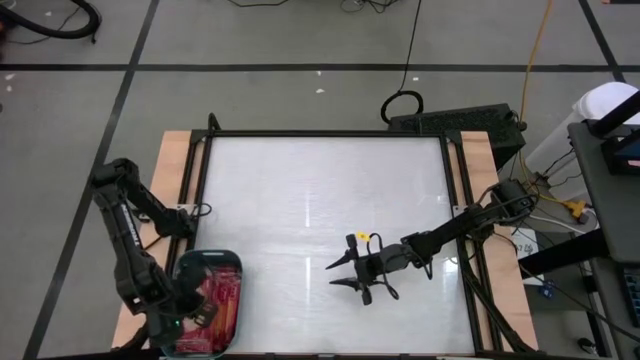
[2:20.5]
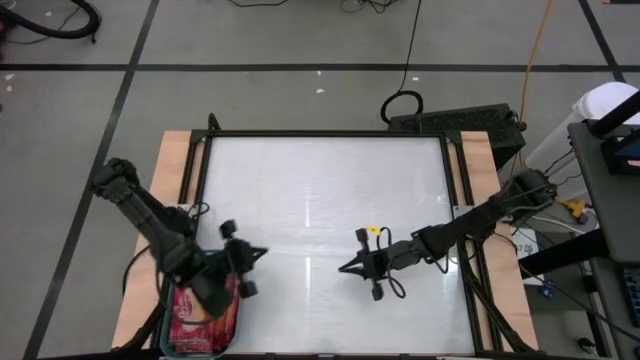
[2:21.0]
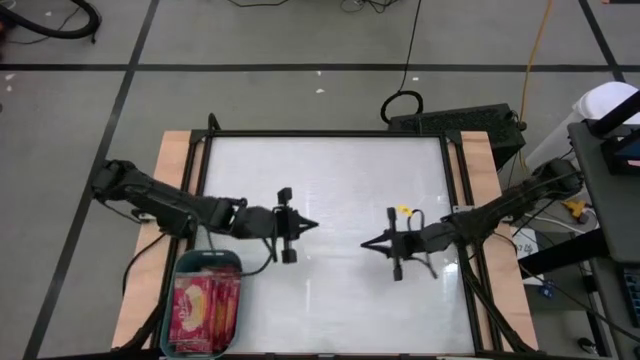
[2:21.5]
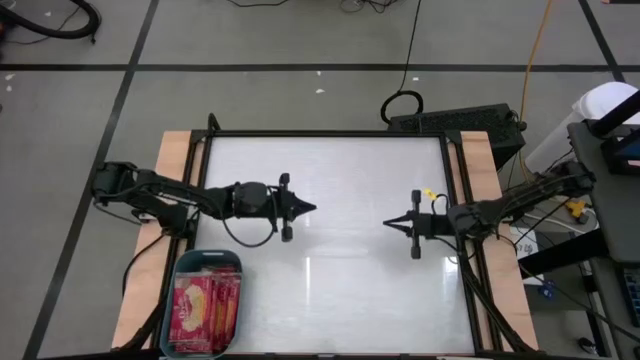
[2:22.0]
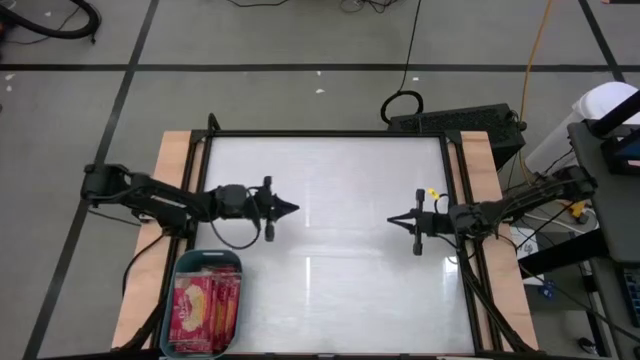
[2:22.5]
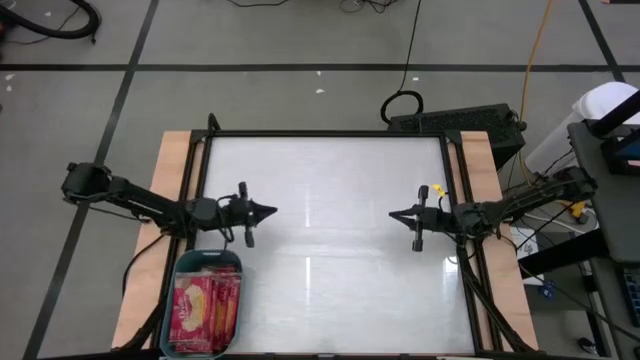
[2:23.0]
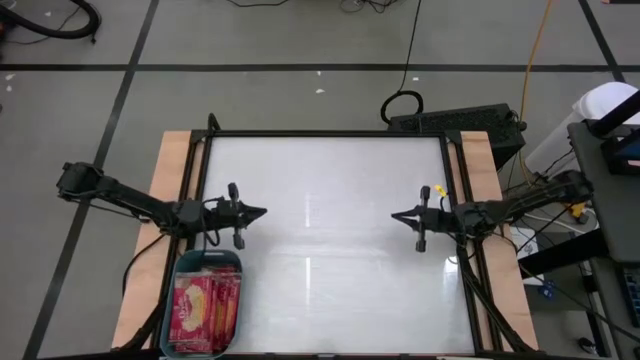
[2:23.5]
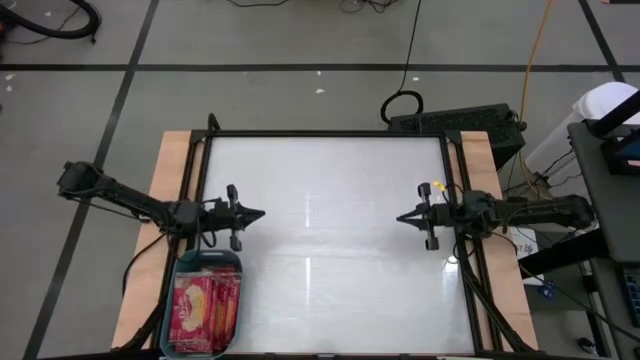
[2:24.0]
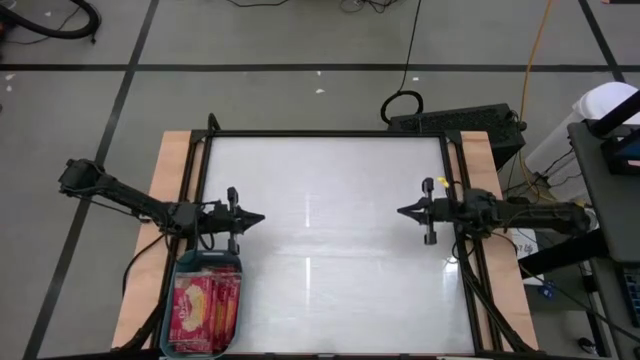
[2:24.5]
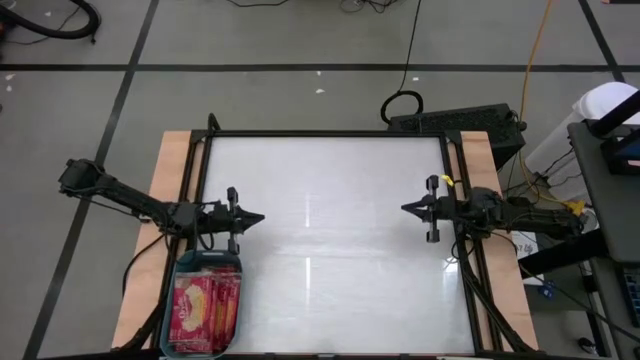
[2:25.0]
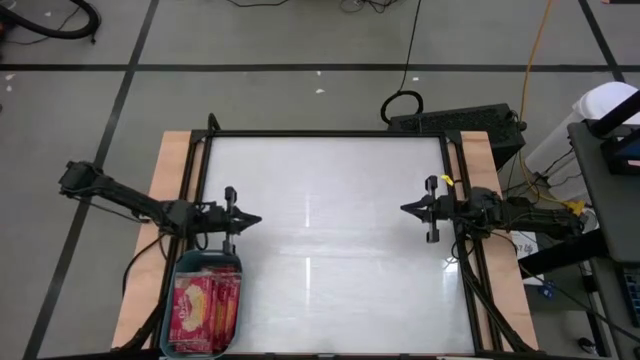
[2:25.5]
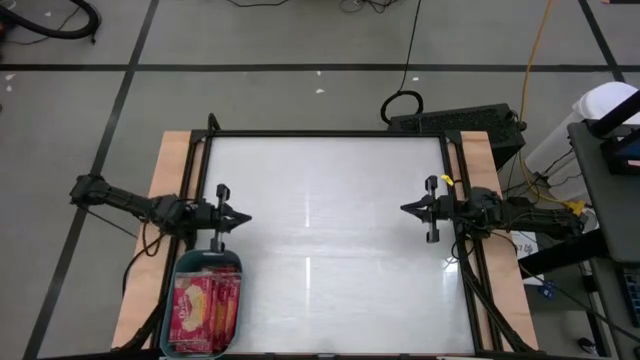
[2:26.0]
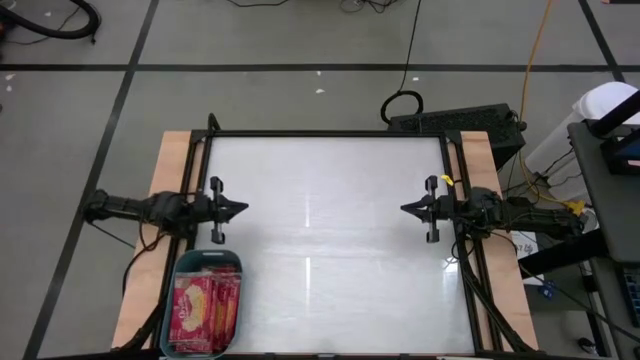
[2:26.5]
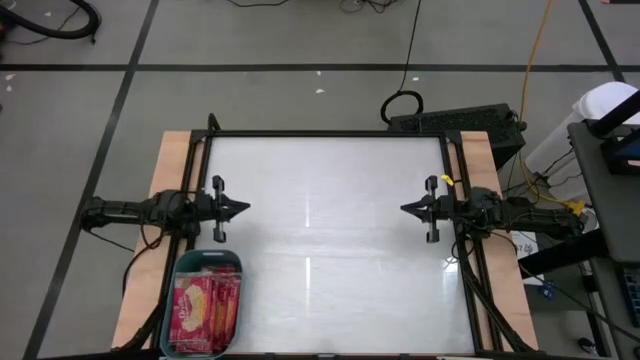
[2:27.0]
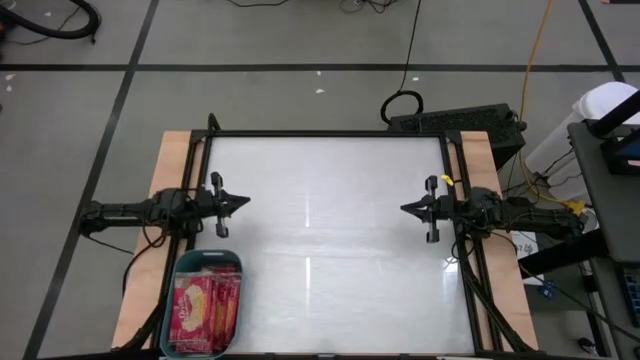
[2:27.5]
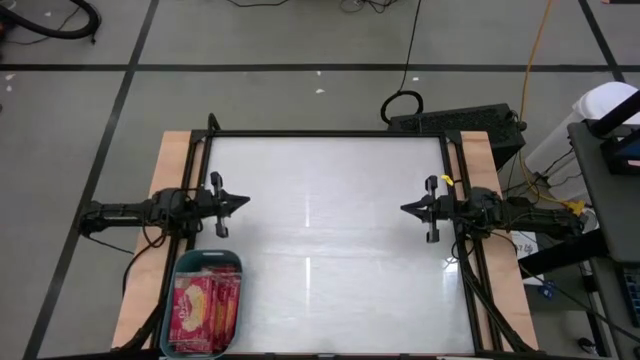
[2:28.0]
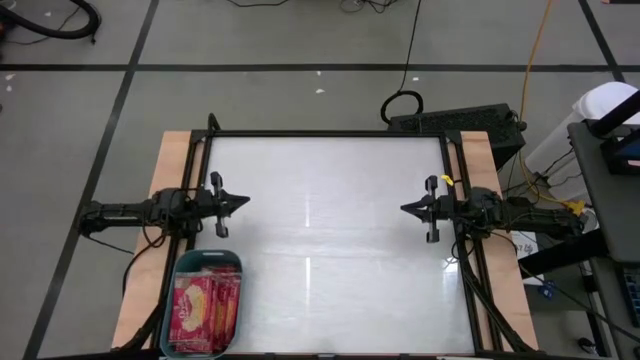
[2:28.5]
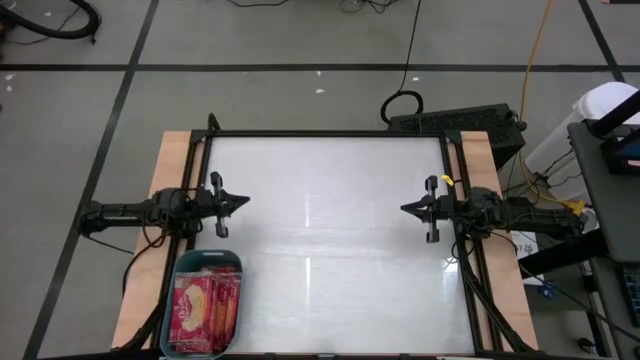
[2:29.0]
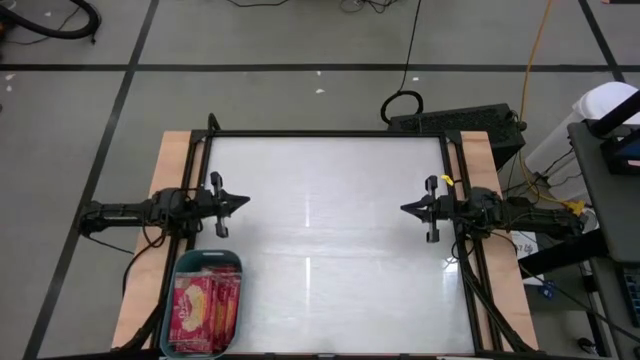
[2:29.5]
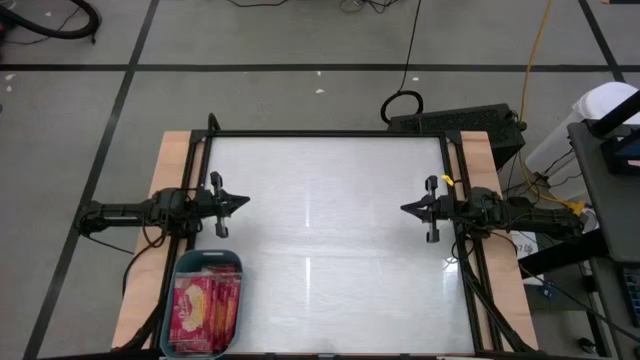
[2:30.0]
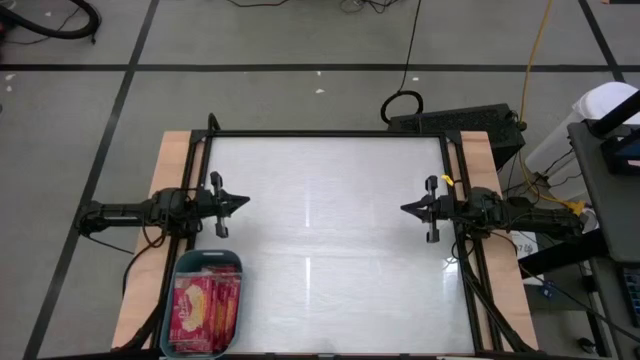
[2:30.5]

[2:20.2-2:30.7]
Task: Sort popcorn bags into baskets
Return to Home Position

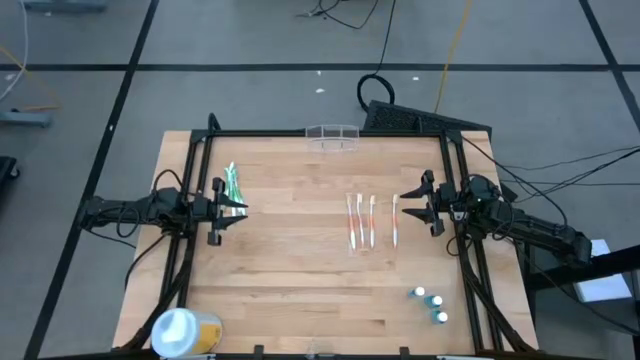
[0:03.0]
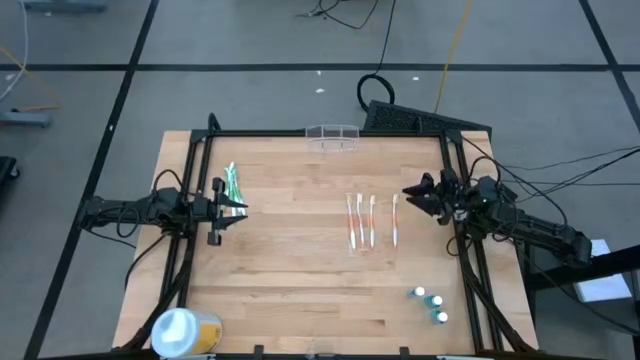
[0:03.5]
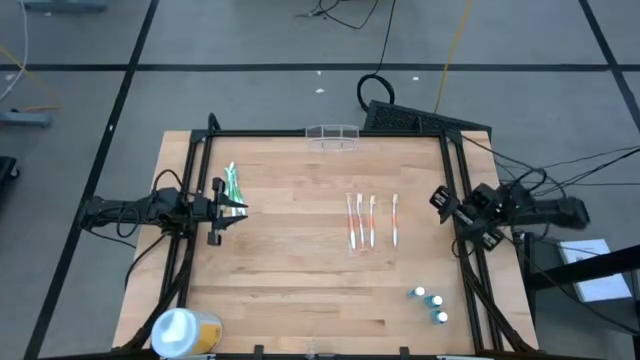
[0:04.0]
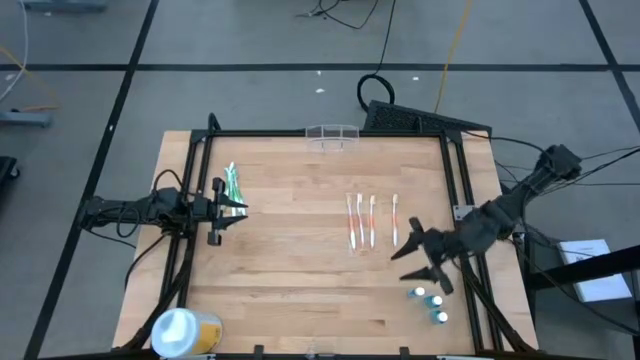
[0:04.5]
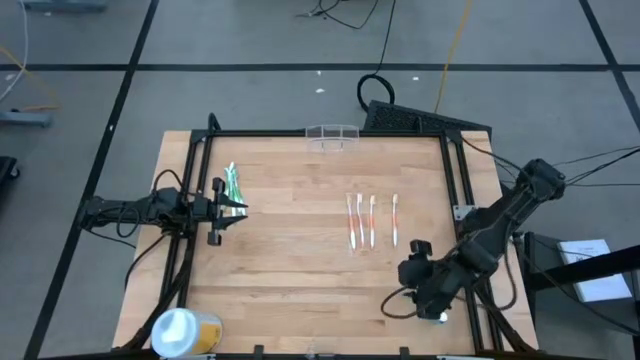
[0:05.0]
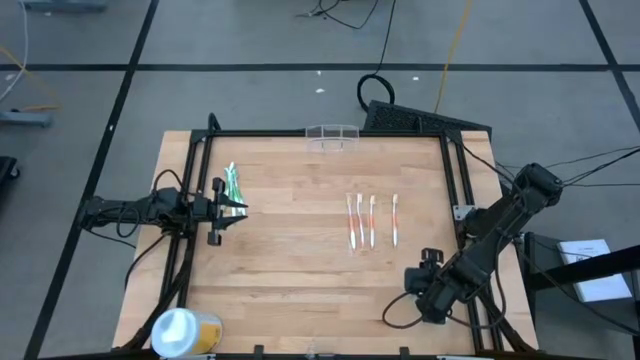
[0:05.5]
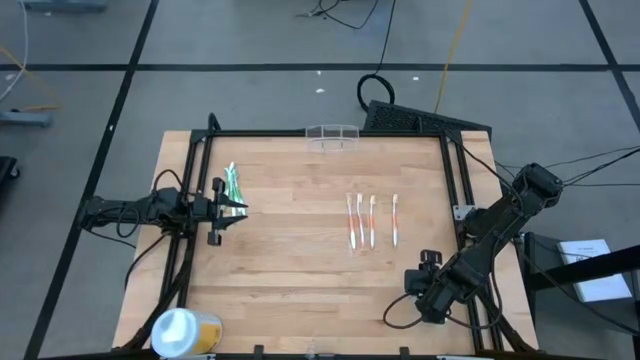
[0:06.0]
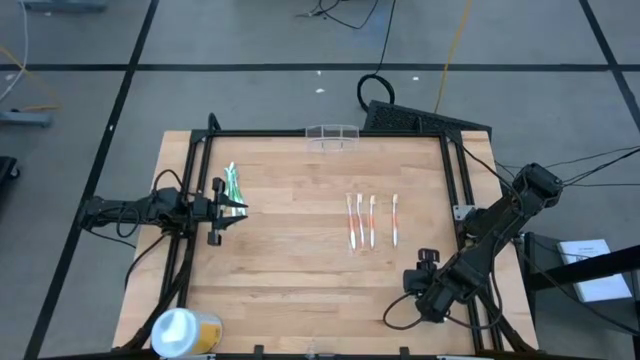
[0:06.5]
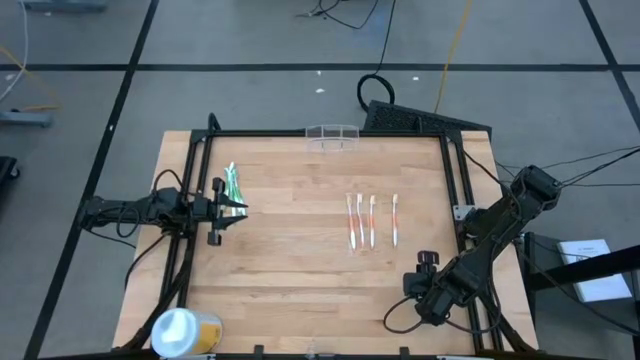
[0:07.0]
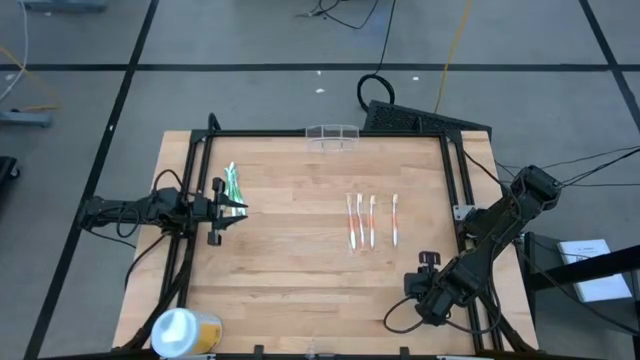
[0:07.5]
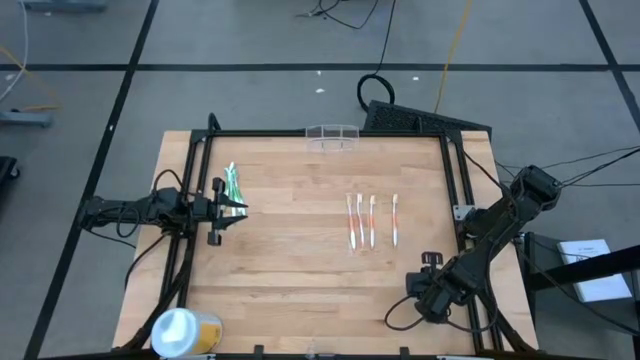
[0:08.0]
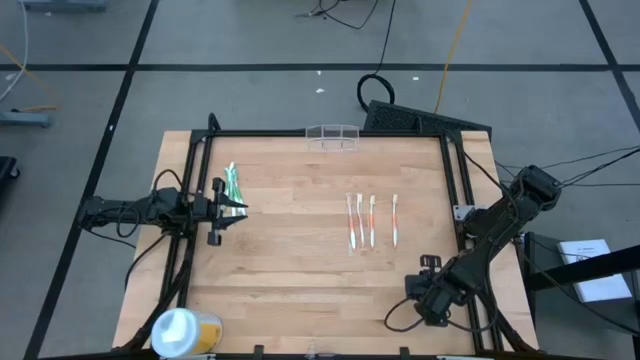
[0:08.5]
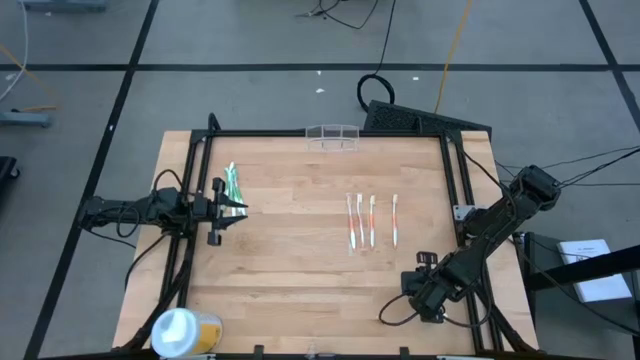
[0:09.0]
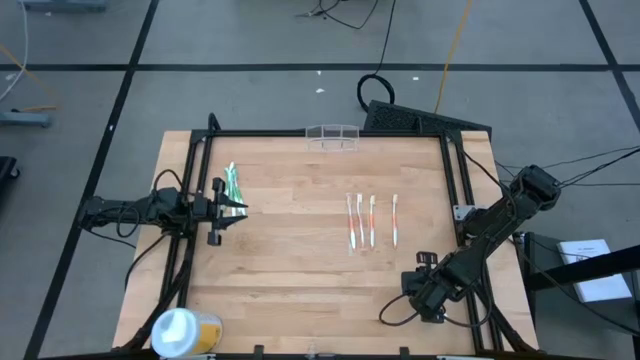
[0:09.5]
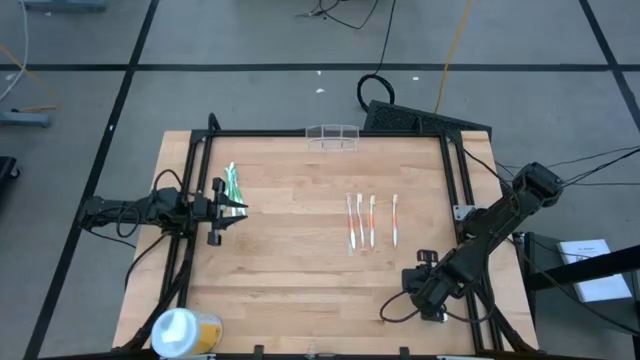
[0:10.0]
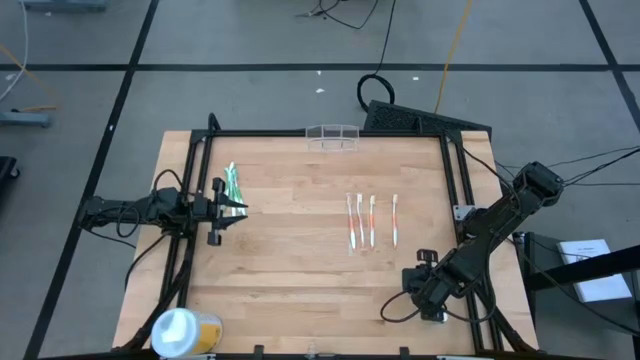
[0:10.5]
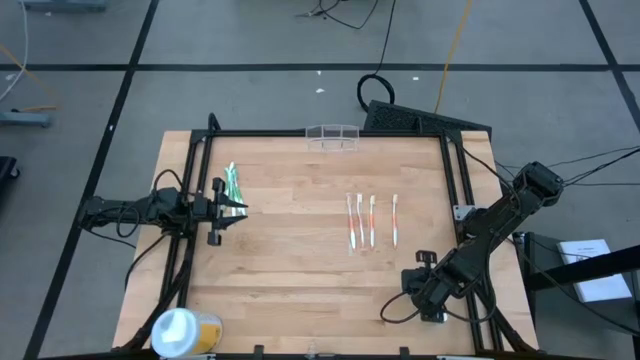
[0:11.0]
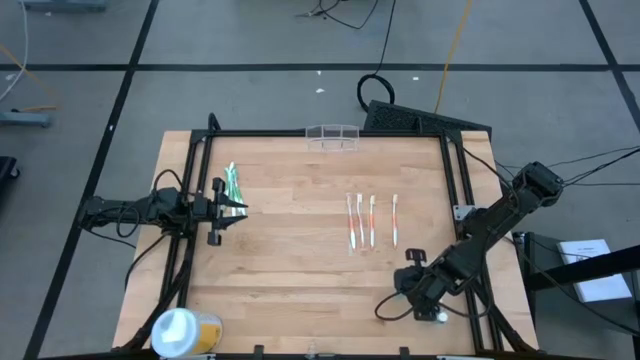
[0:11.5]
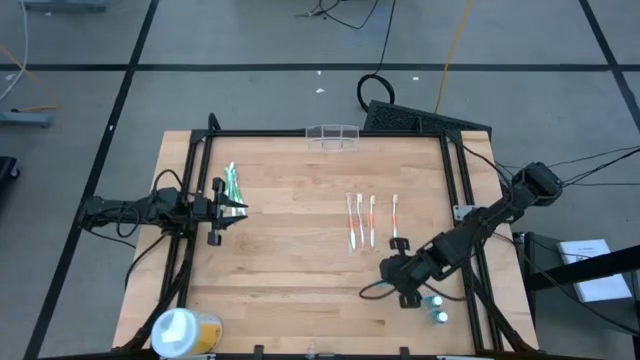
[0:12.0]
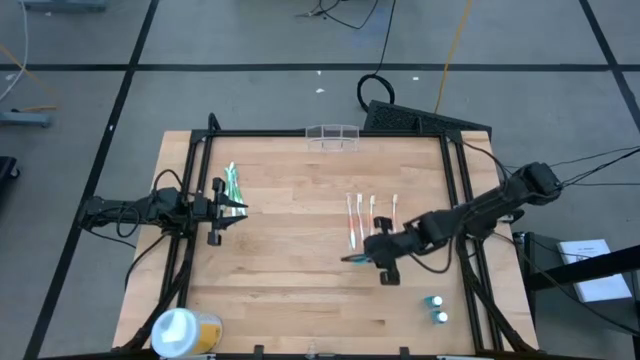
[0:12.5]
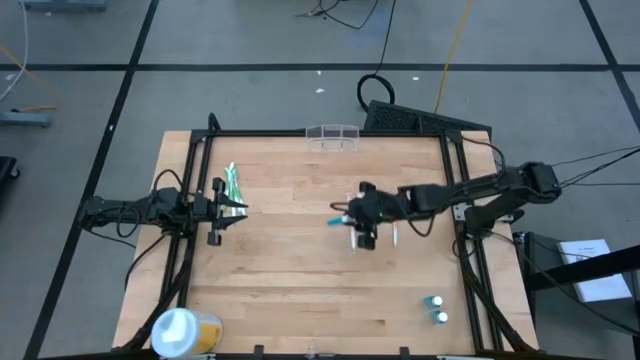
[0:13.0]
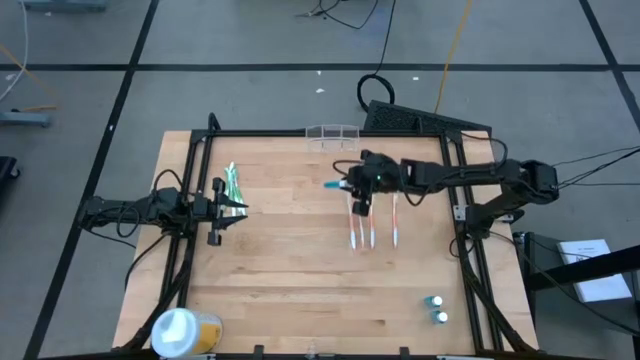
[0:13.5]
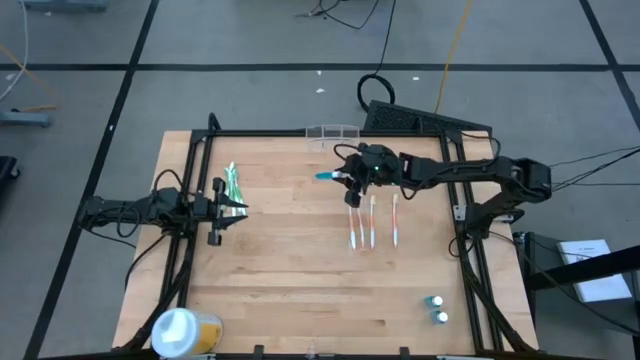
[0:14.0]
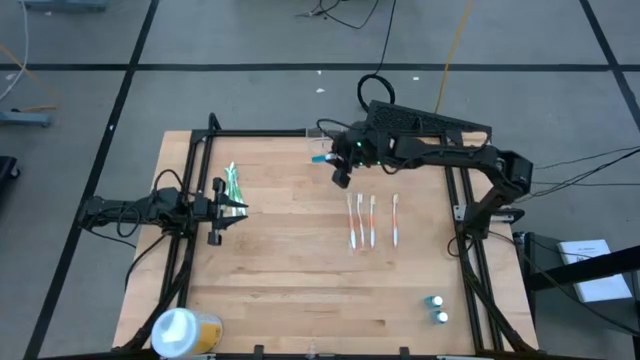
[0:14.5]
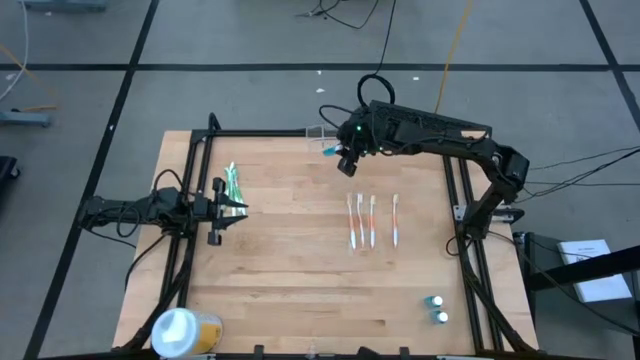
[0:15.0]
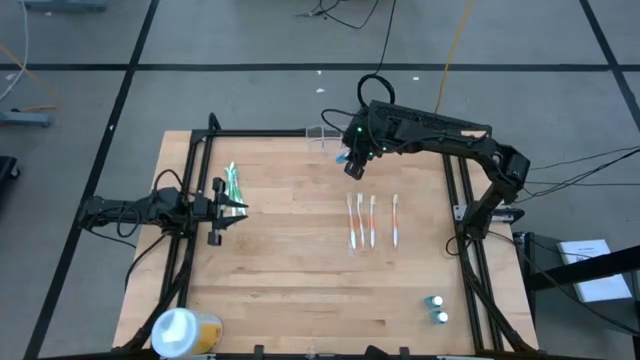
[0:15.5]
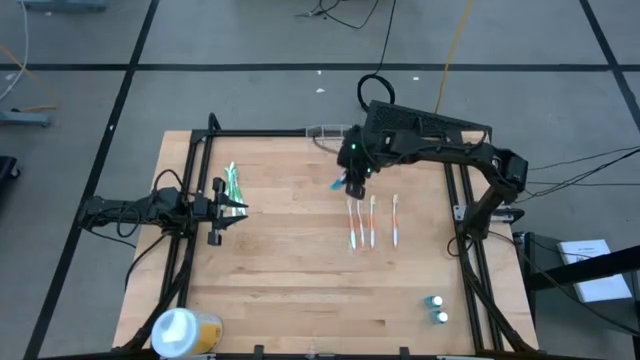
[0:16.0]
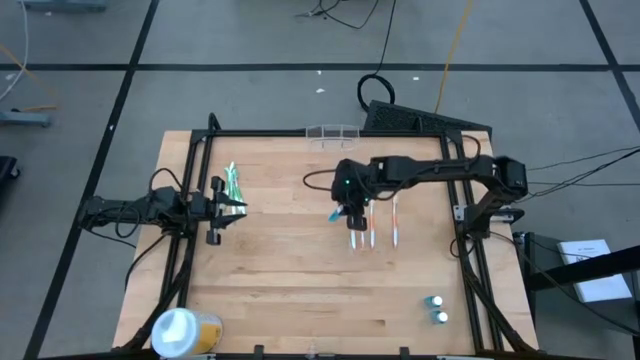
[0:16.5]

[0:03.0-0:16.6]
Task: Pick & Place toothbrushing station
Put the blue mouthwash into the transparent organizer
